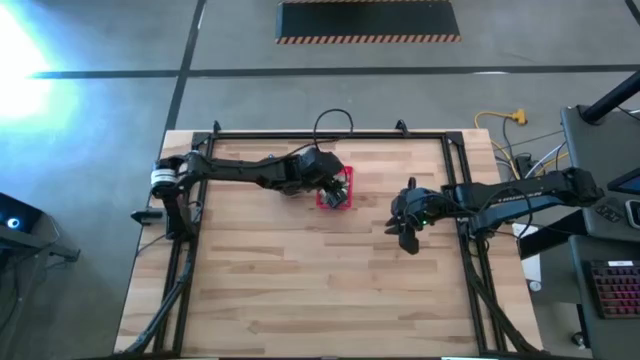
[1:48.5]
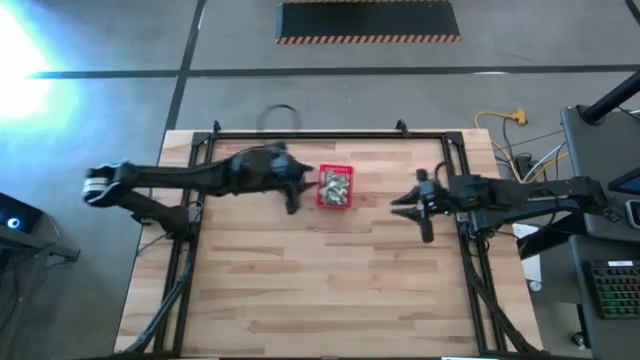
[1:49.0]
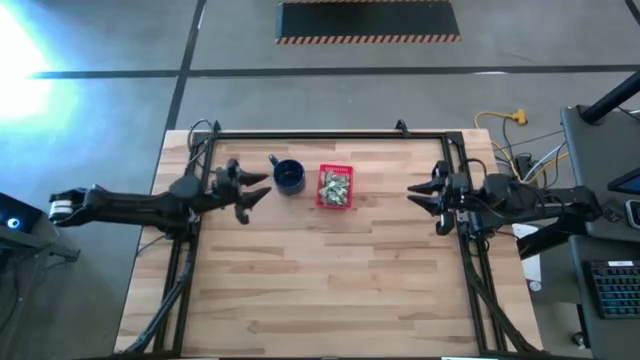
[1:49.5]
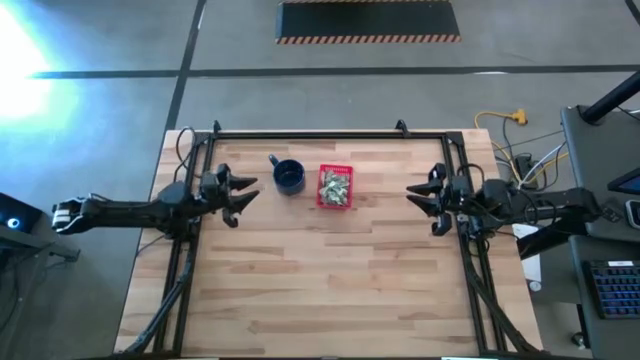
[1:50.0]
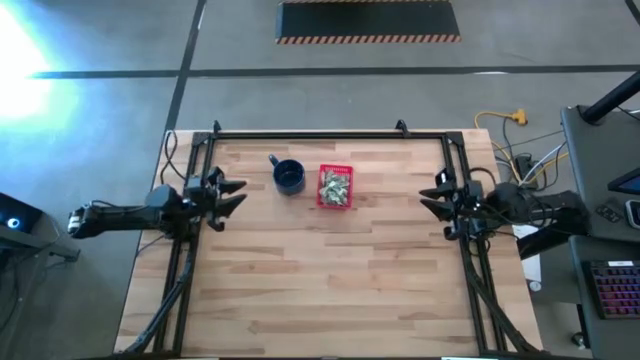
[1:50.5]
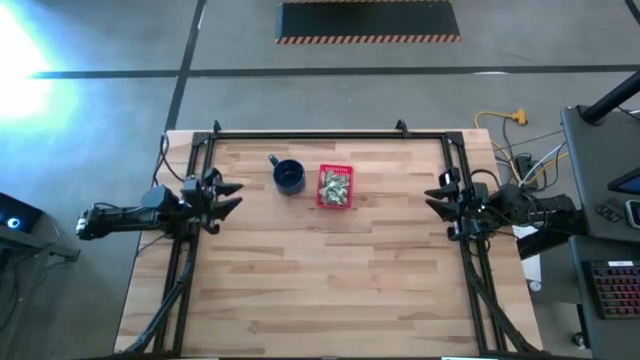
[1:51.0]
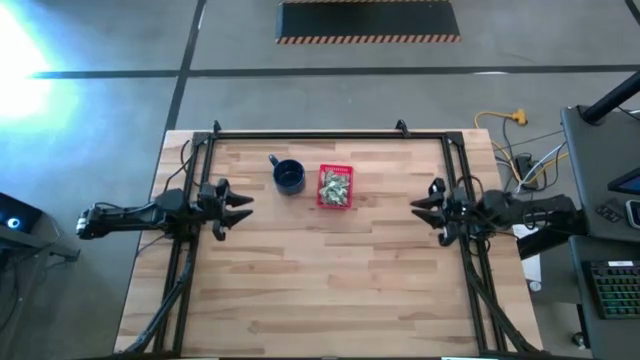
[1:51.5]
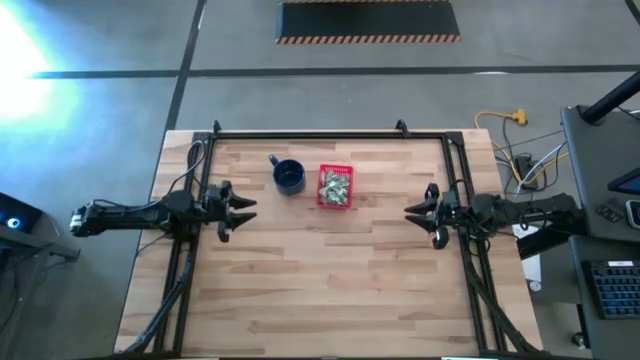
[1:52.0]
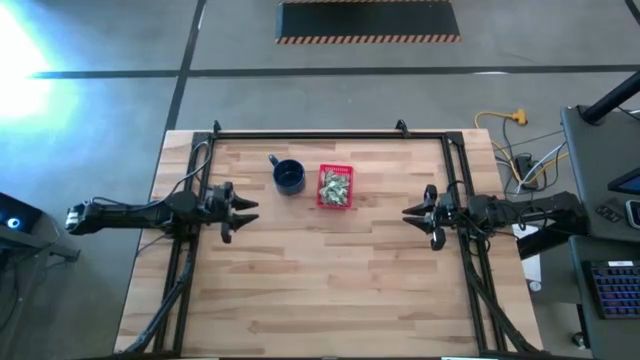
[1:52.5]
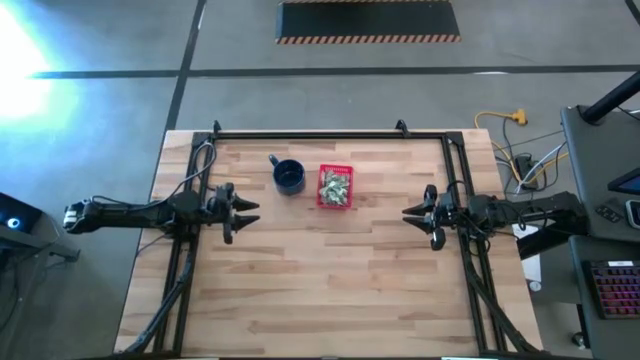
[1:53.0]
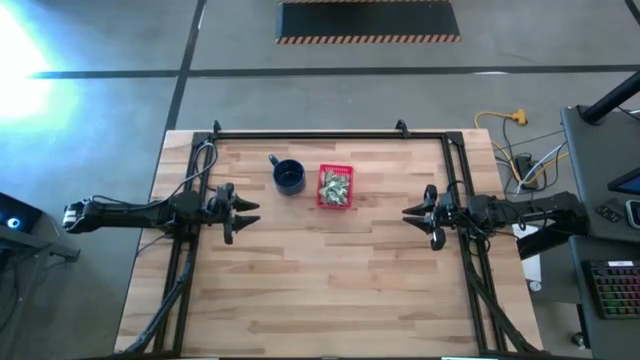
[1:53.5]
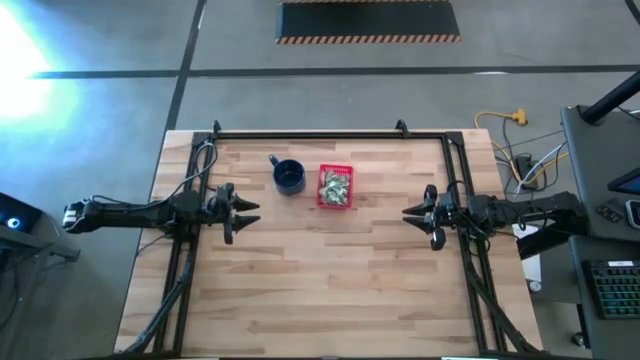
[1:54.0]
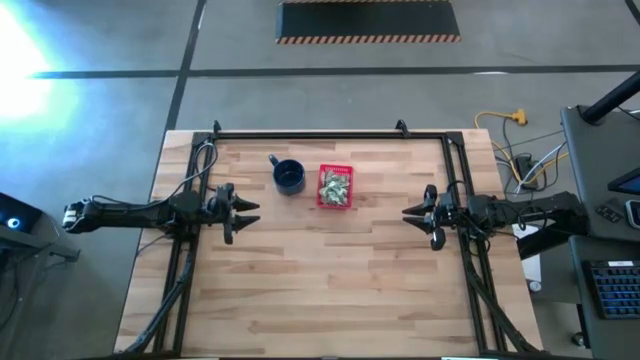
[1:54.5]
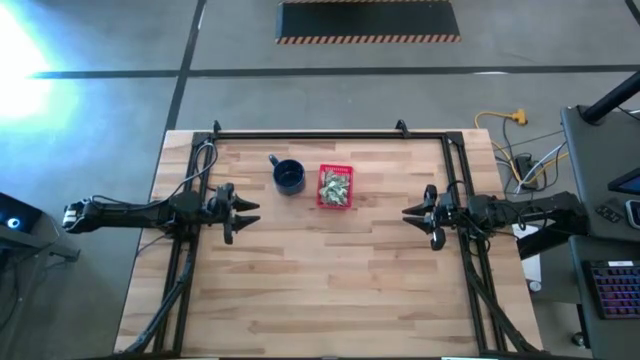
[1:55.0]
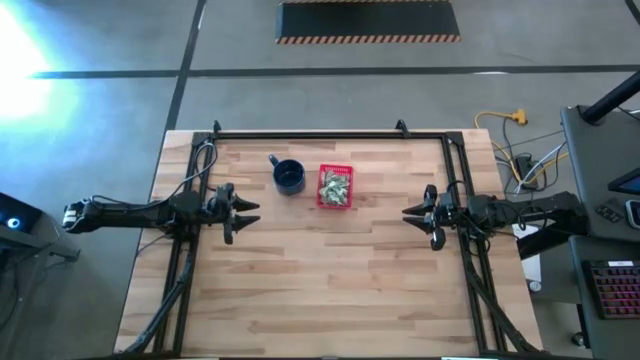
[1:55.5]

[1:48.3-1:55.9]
Task: Pick and place Stevia / Truvia into bins
Return to Home Position

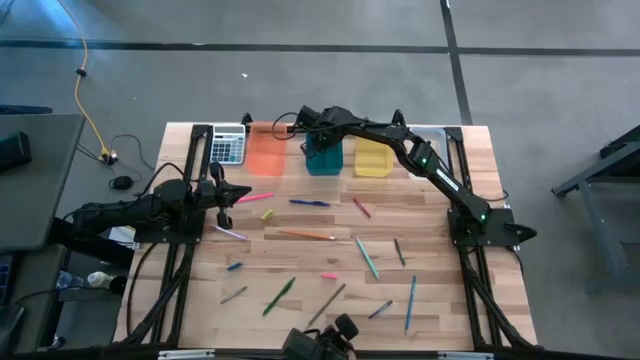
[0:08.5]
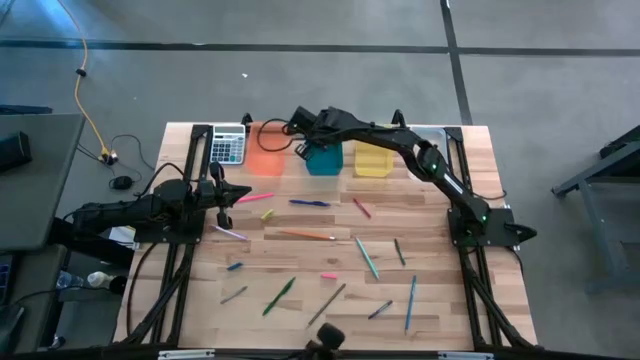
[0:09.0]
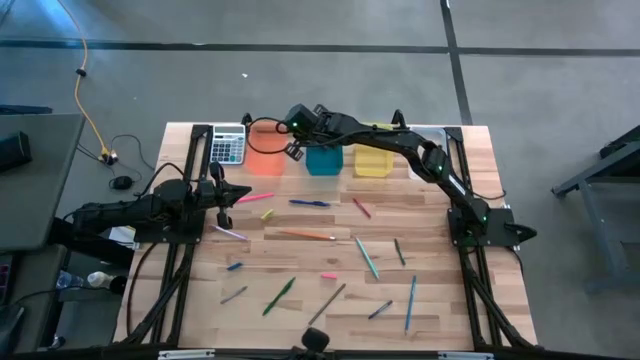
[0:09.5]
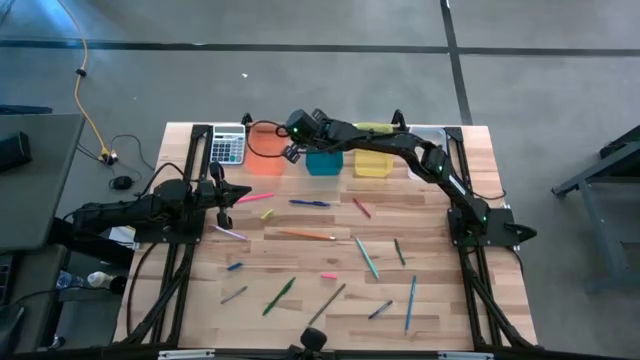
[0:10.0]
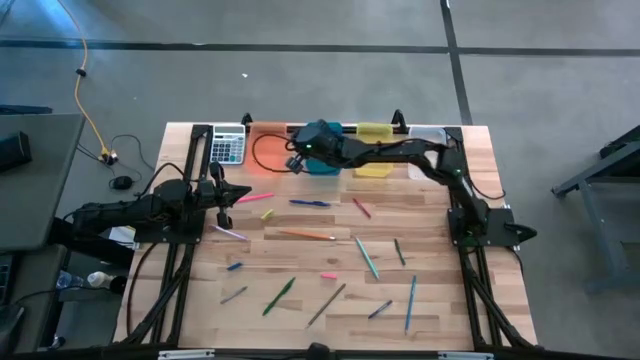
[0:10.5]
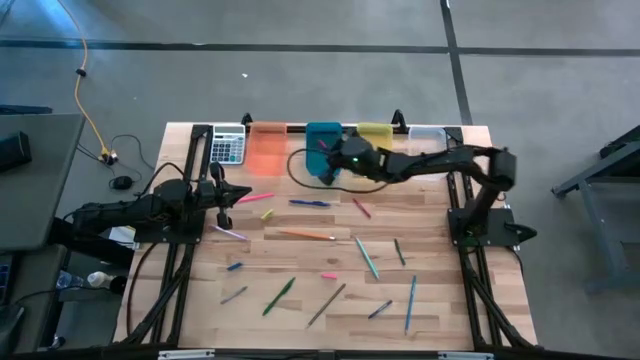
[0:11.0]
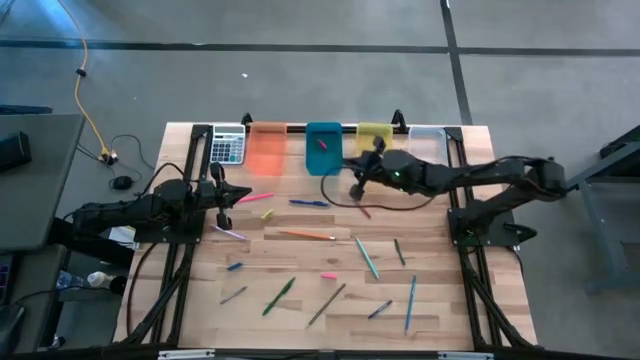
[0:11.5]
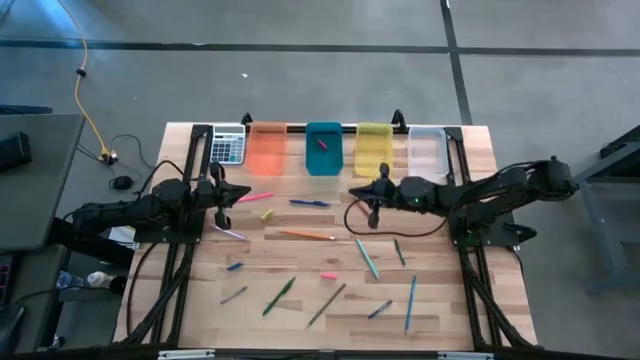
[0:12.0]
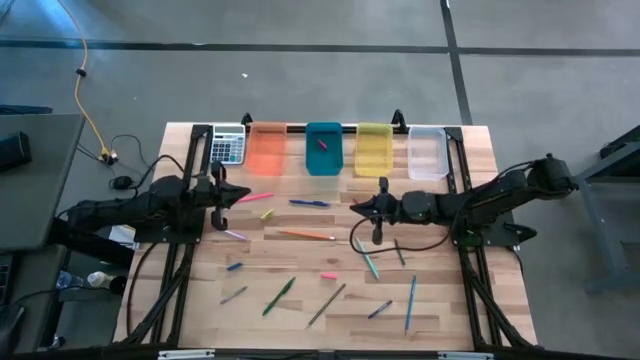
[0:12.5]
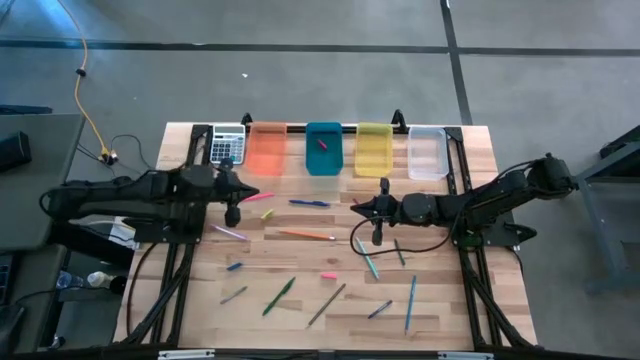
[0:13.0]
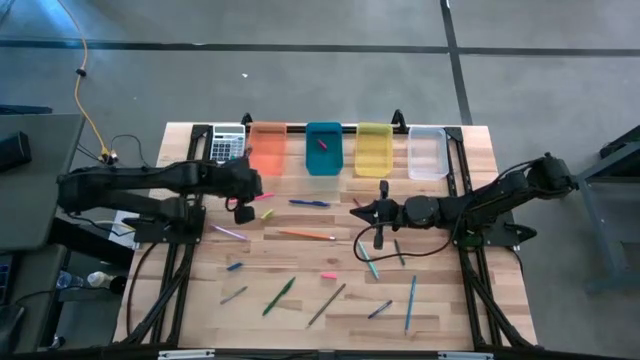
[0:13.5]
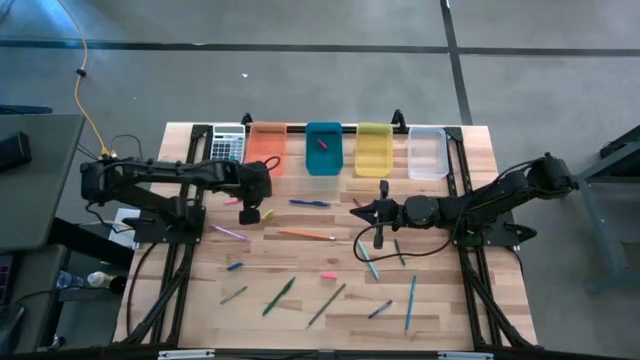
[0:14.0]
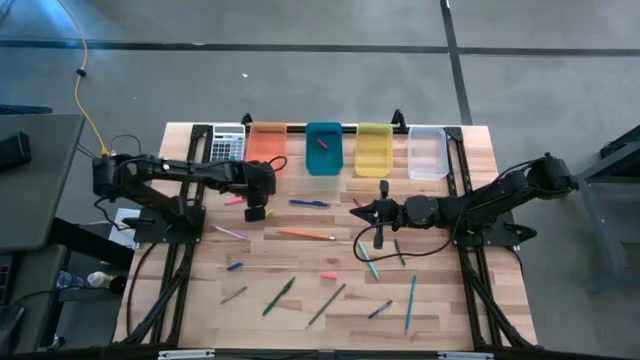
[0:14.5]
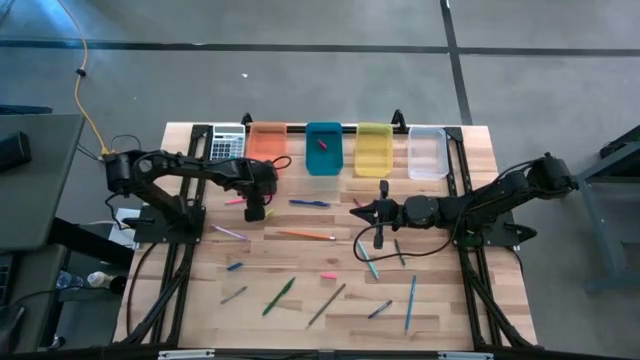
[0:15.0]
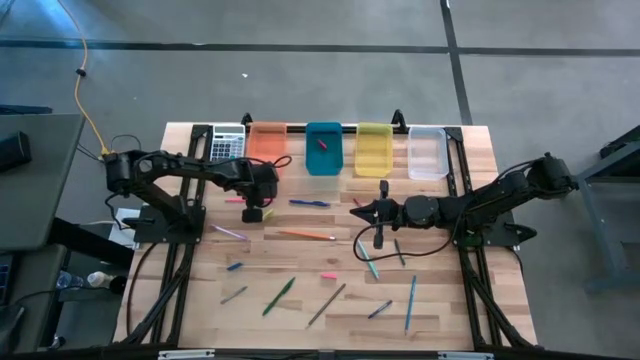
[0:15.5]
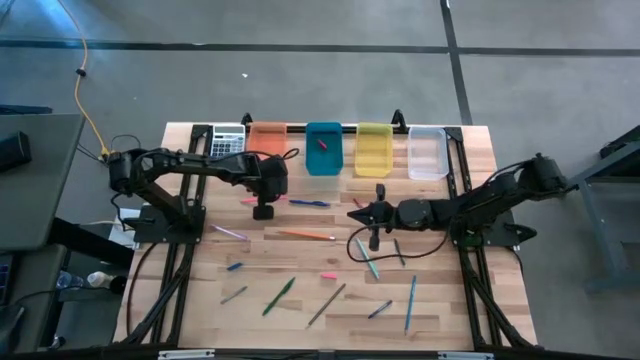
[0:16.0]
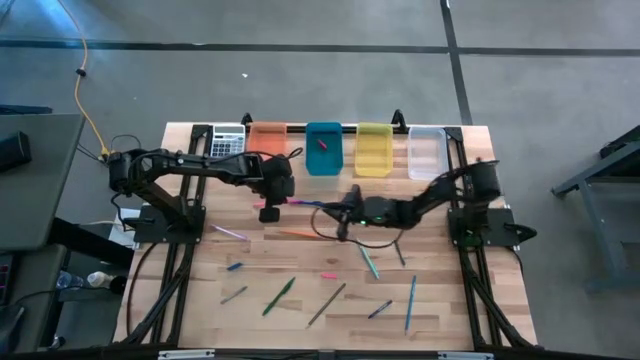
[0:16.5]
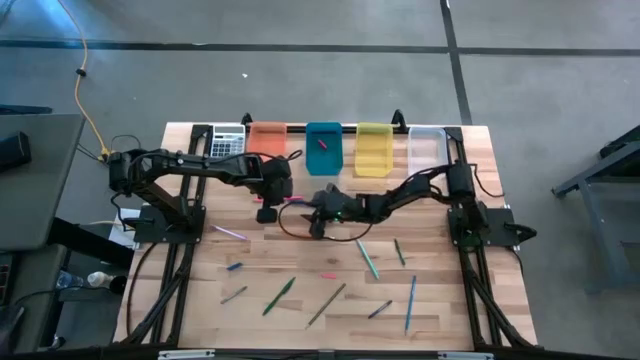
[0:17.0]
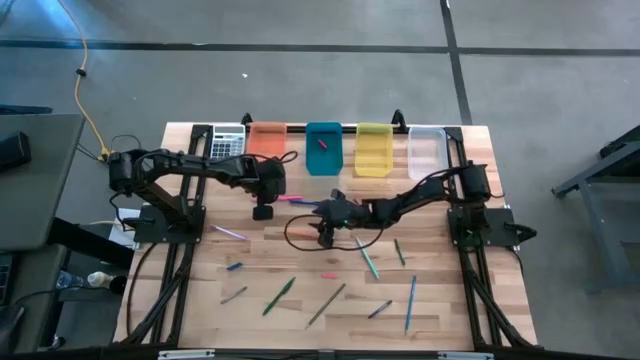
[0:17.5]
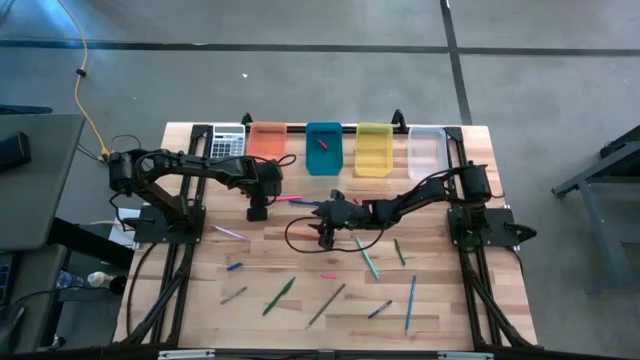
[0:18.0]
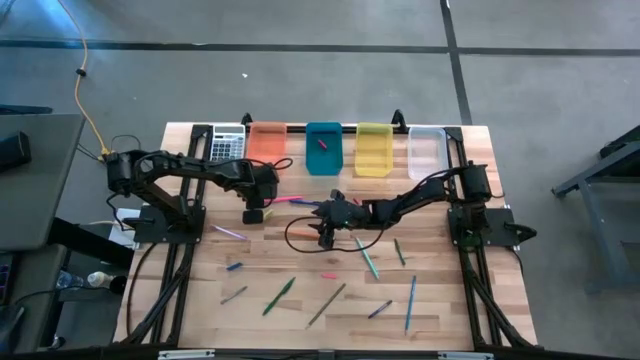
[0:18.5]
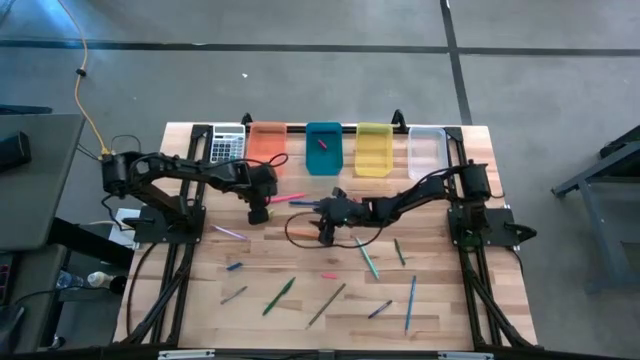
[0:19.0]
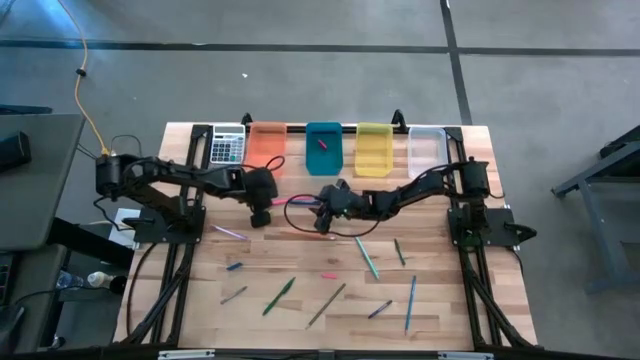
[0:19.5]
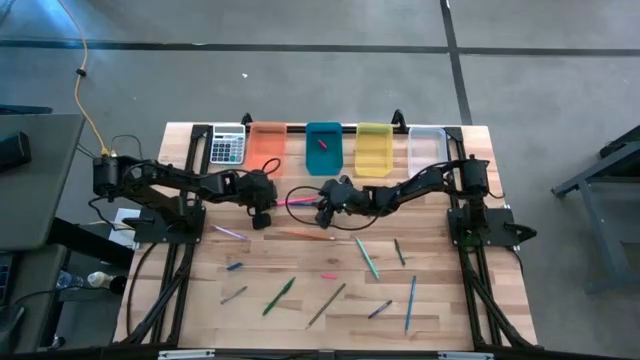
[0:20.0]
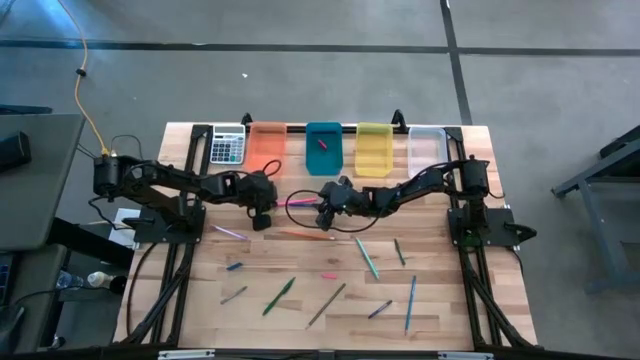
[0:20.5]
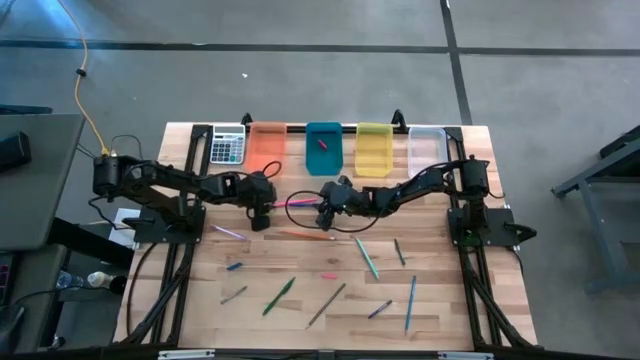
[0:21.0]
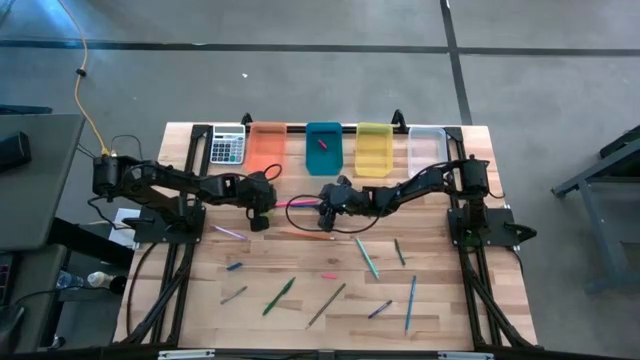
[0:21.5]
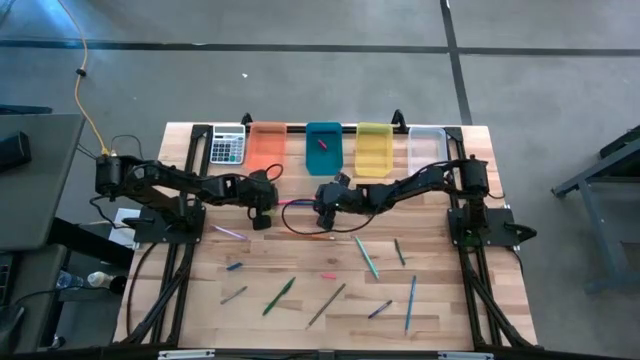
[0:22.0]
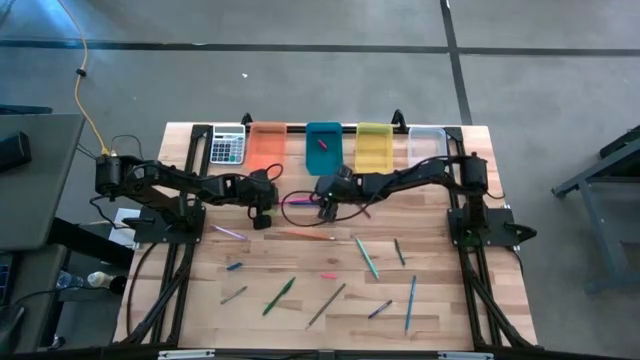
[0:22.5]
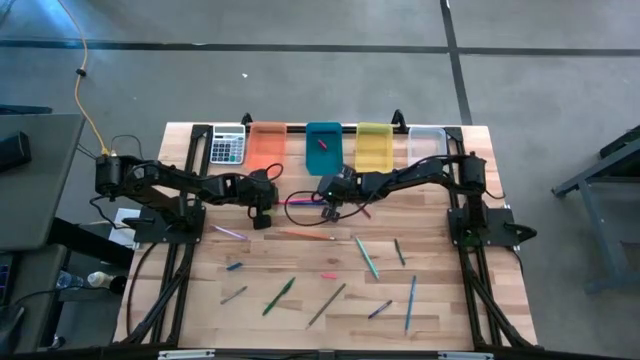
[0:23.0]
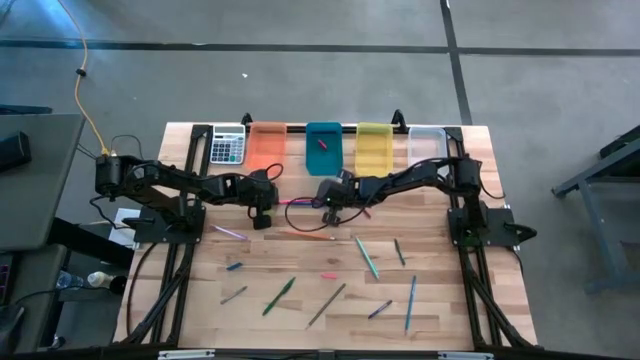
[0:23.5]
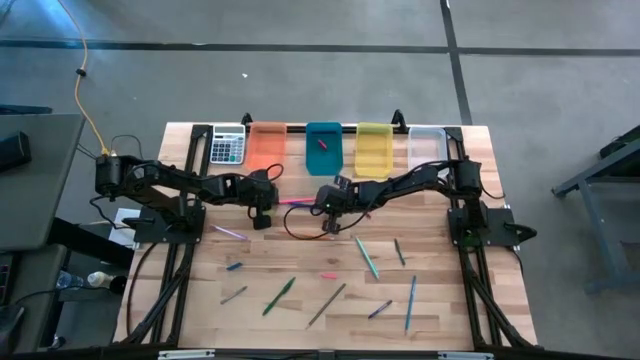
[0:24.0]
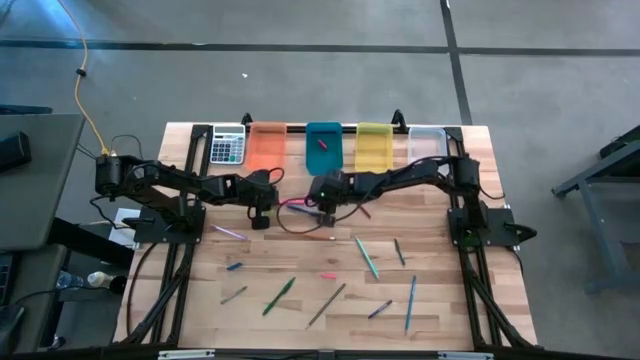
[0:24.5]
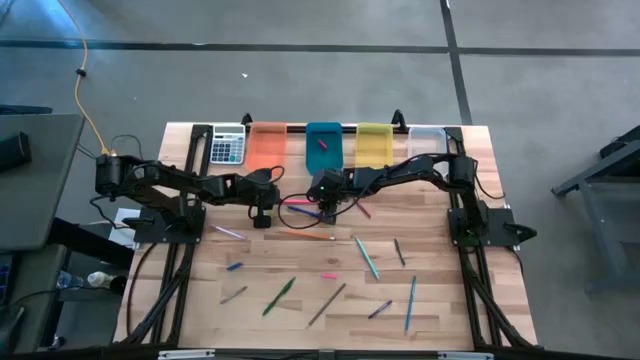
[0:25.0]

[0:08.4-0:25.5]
Task: Sort crayons/erasers/pens/pencils in bins
Put the pink pencil into the transparent bin
